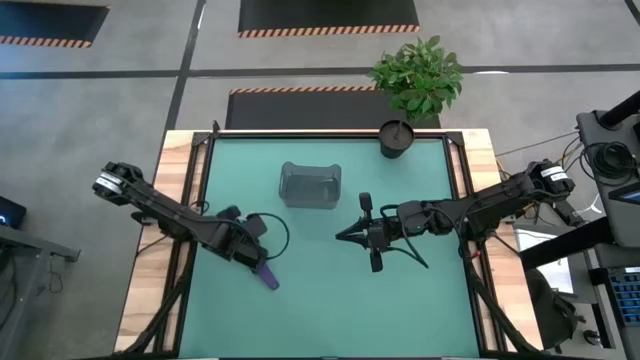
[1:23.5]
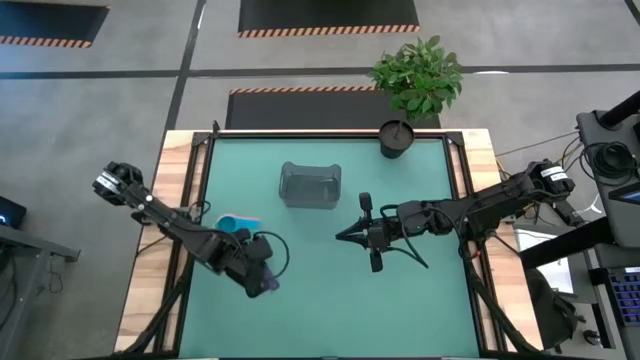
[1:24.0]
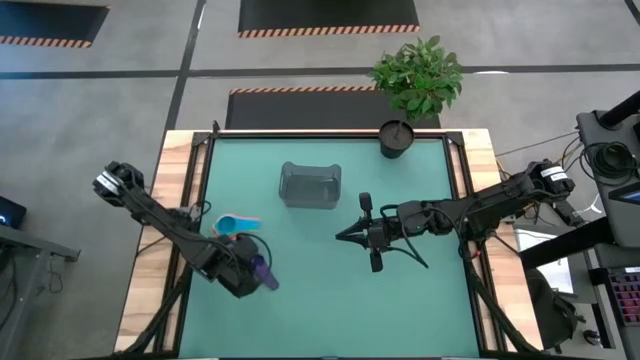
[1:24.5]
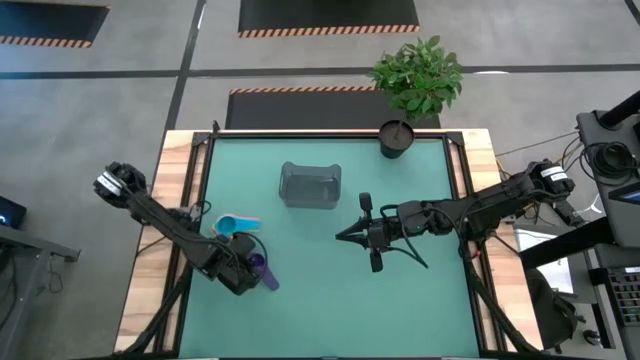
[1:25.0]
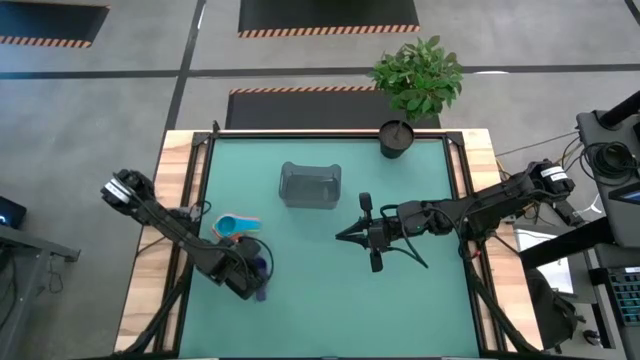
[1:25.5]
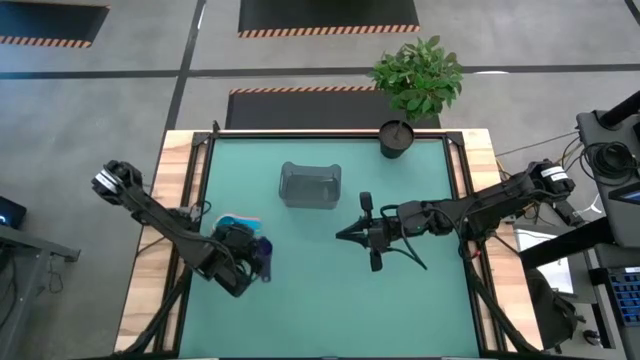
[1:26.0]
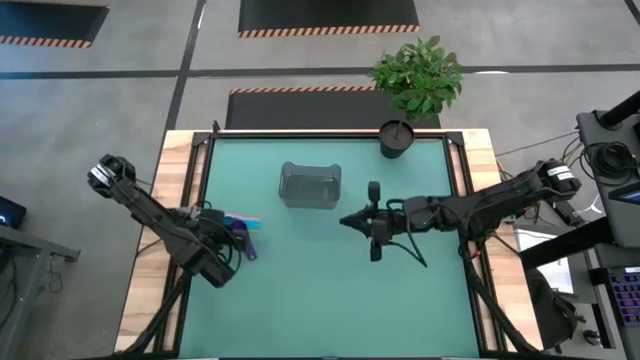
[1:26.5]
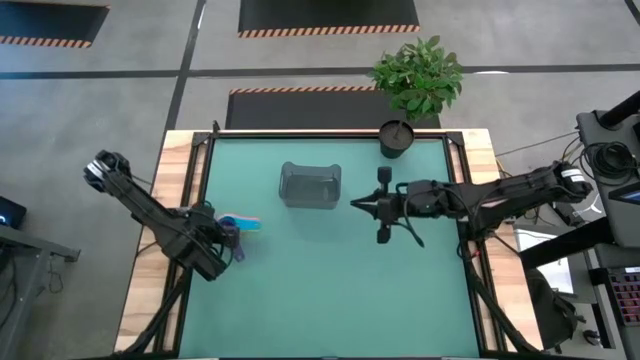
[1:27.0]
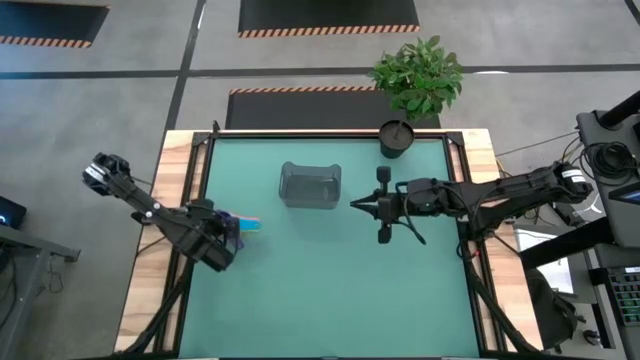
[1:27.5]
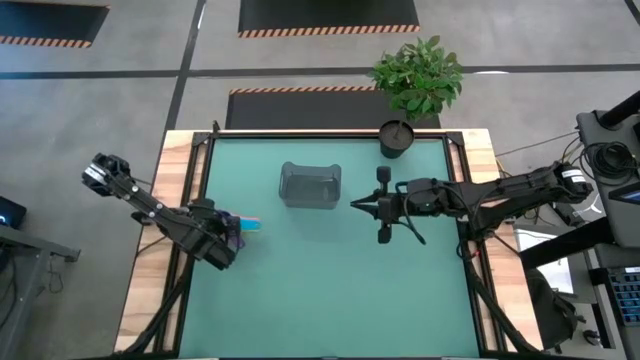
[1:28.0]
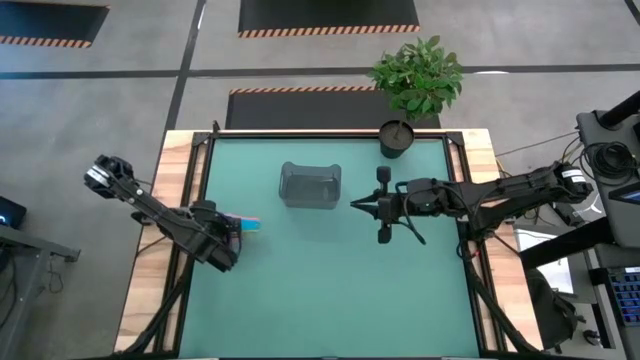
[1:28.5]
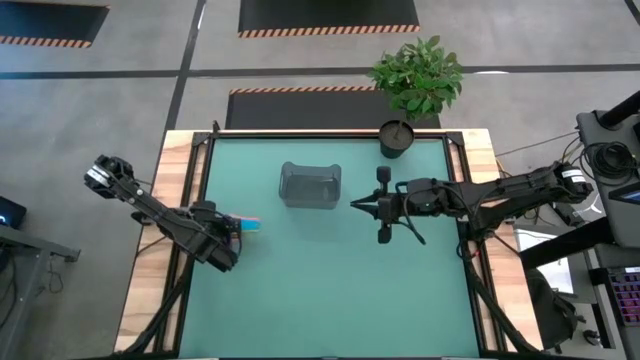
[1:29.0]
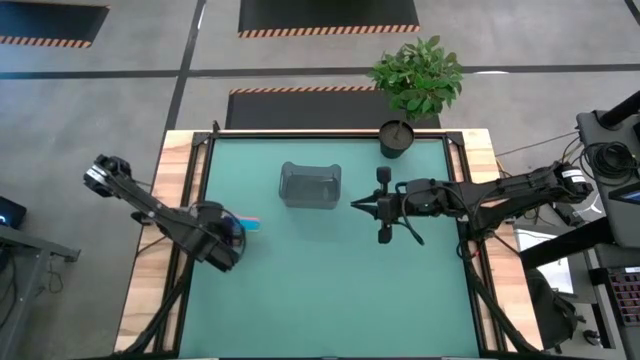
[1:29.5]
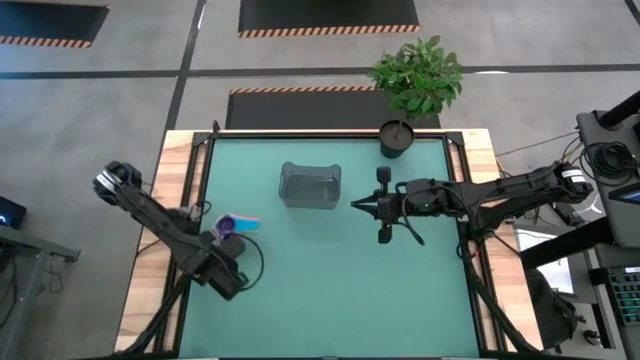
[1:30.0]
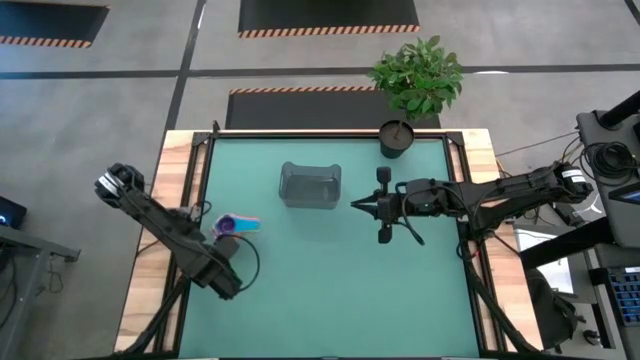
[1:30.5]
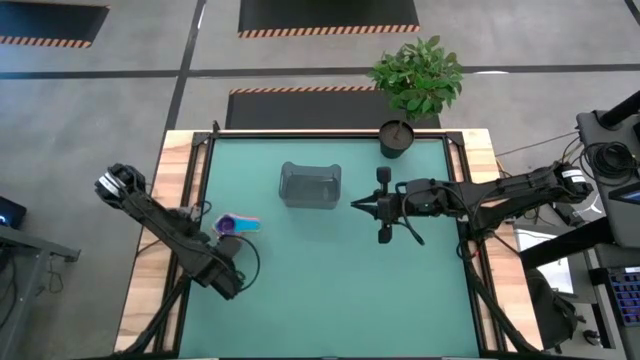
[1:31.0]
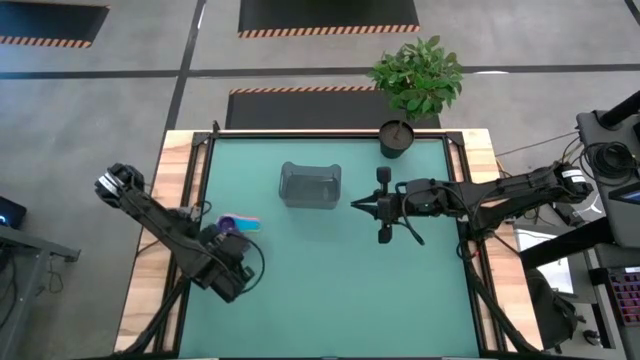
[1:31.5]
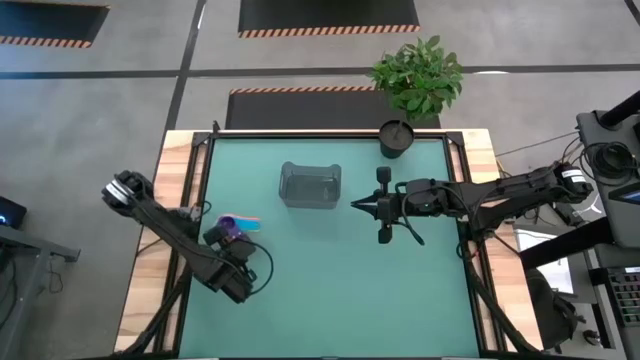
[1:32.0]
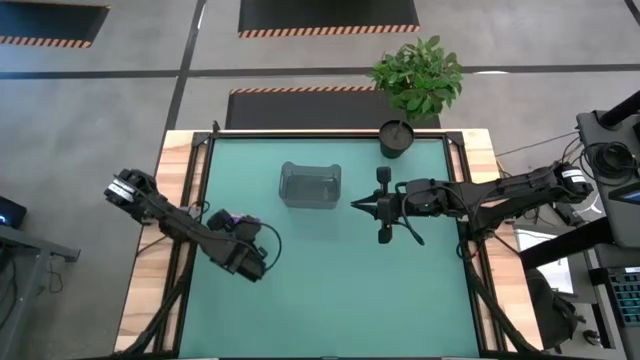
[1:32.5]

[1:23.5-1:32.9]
Task: Nest measuring cups in basket
Stack the purple measuring cup into the blue measuring cup

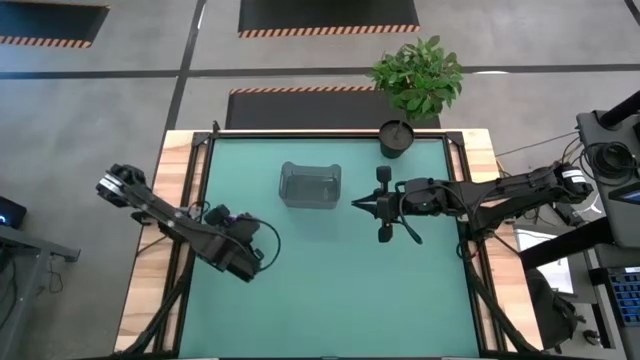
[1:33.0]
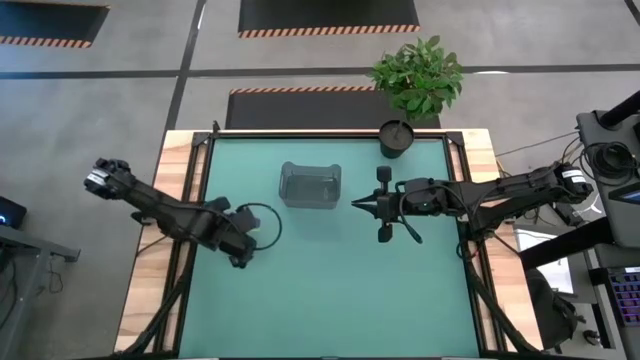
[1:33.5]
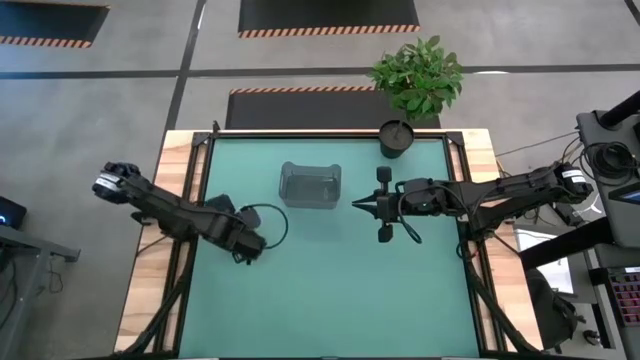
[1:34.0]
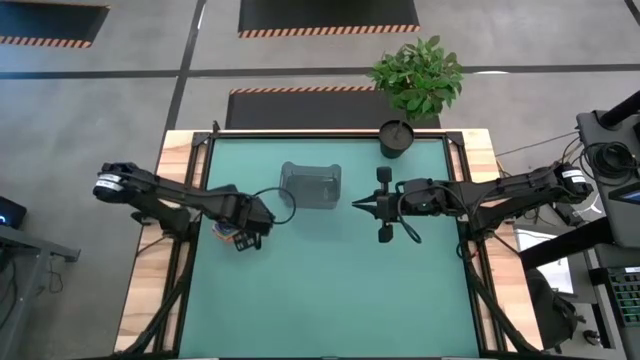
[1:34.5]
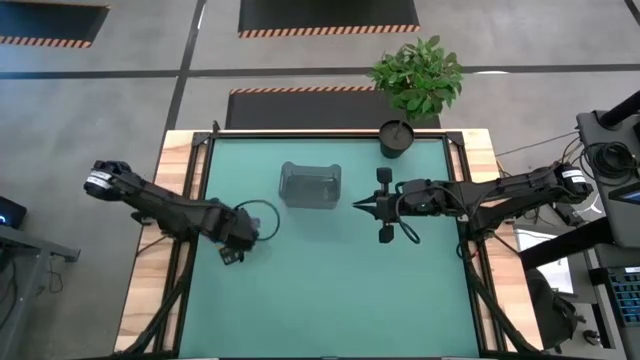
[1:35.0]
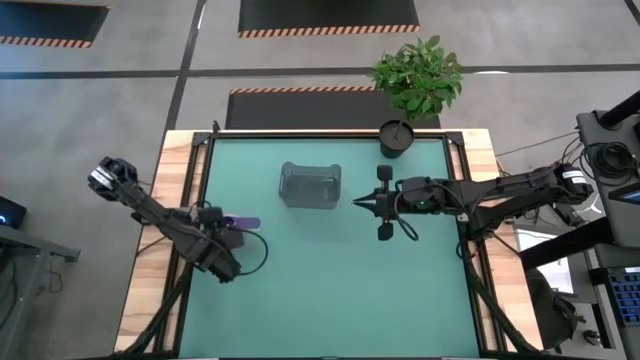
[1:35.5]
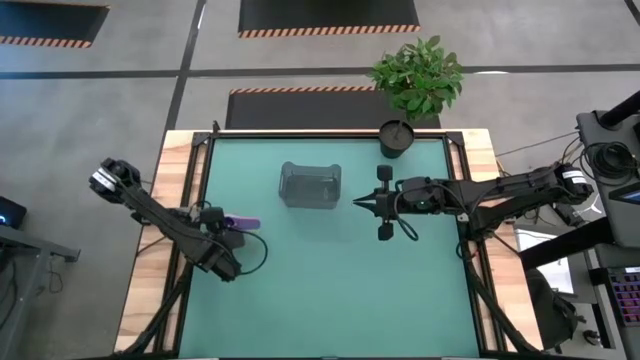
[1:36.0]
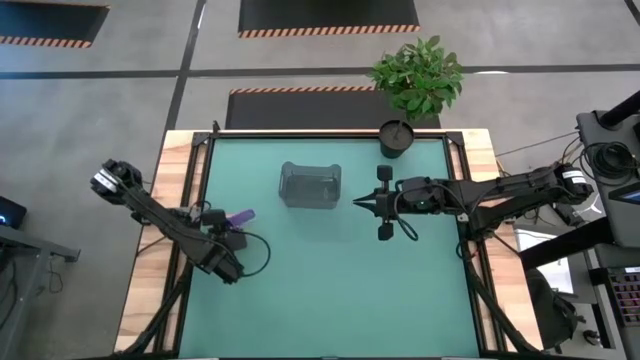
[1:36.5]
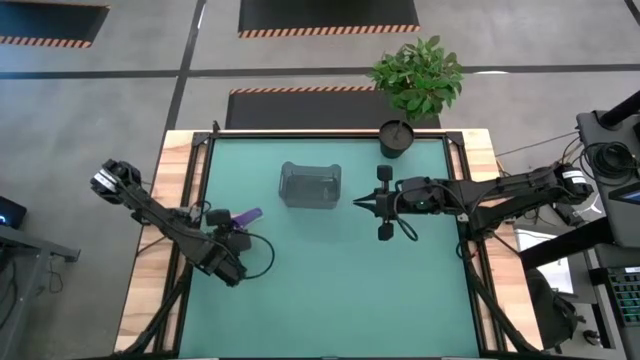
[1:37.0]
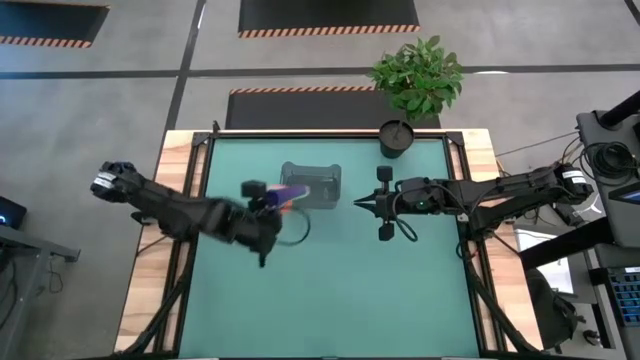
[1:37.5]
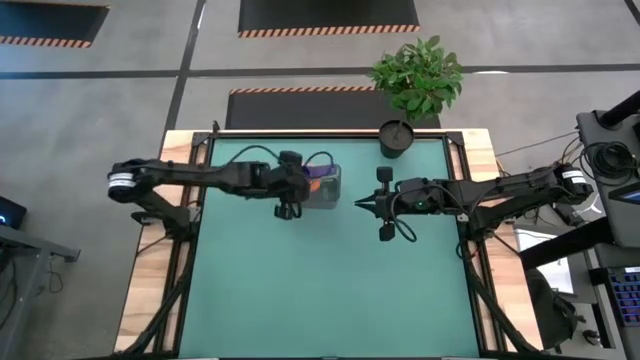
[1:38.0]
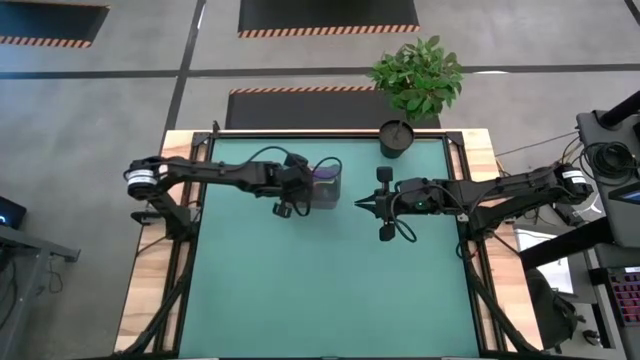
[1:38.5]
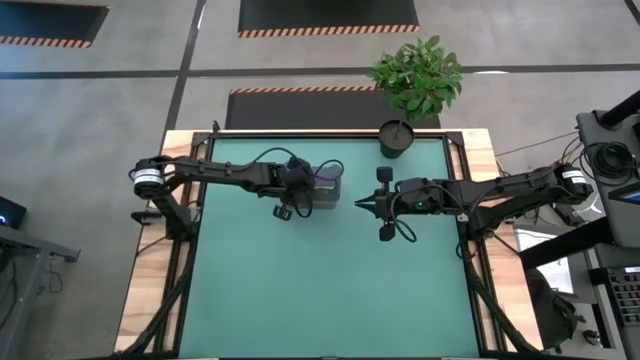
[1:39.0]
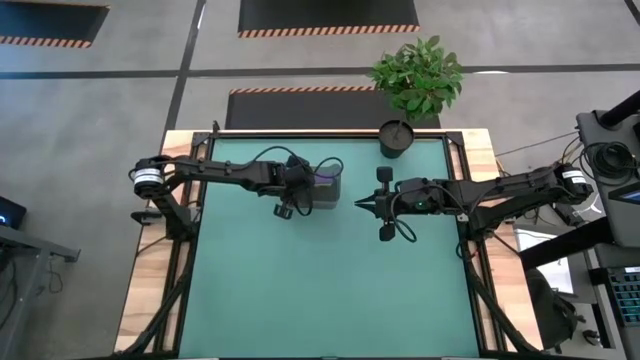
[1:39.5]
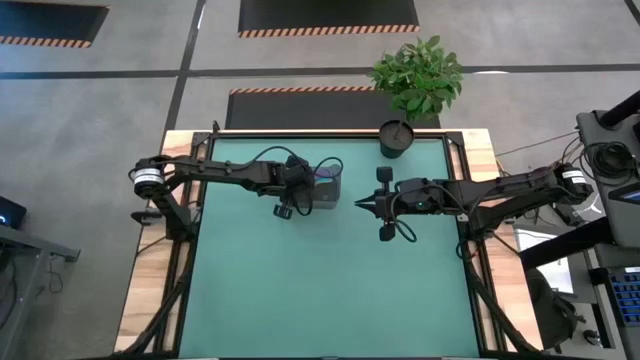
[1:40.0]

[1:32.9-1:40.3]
Put all the measuring cups into the black bin

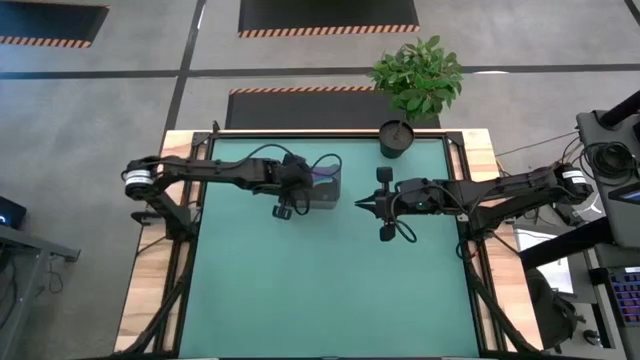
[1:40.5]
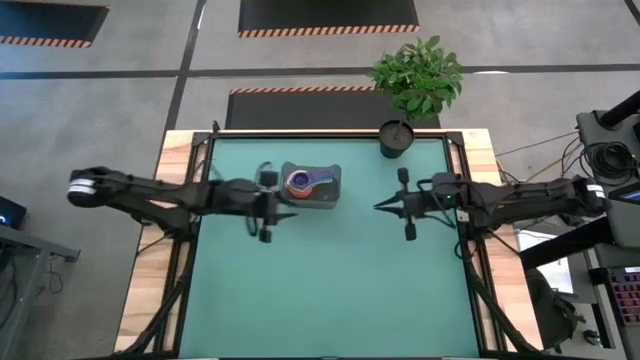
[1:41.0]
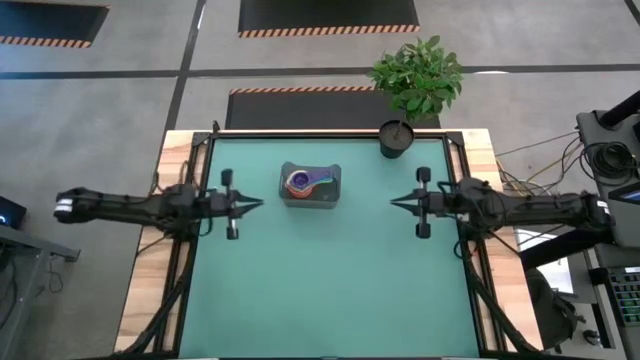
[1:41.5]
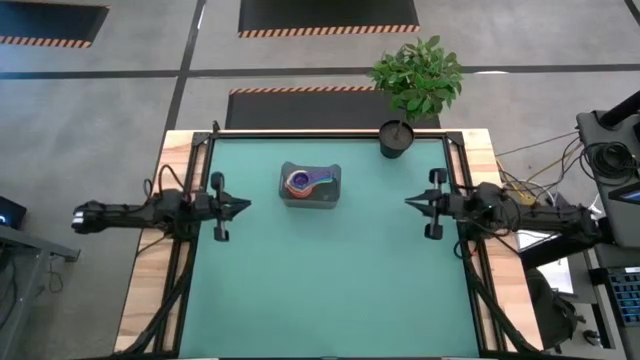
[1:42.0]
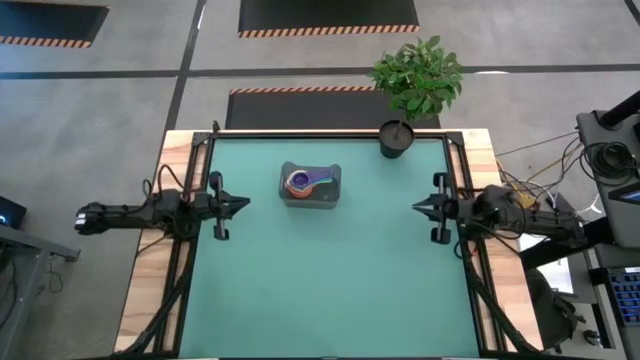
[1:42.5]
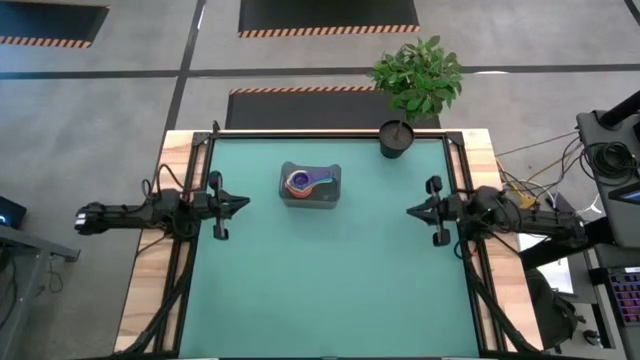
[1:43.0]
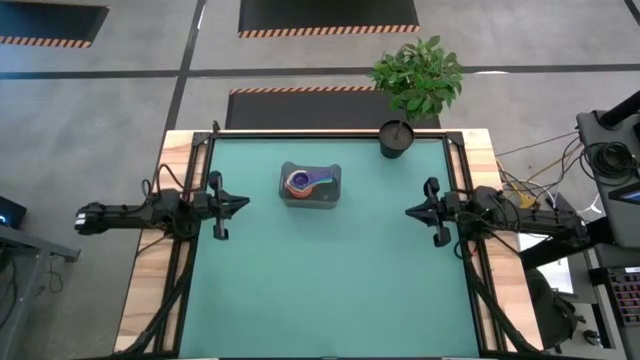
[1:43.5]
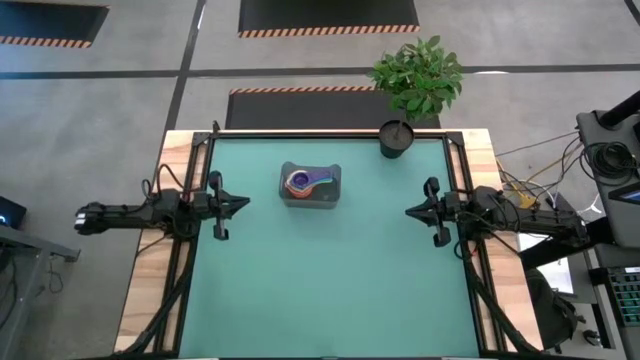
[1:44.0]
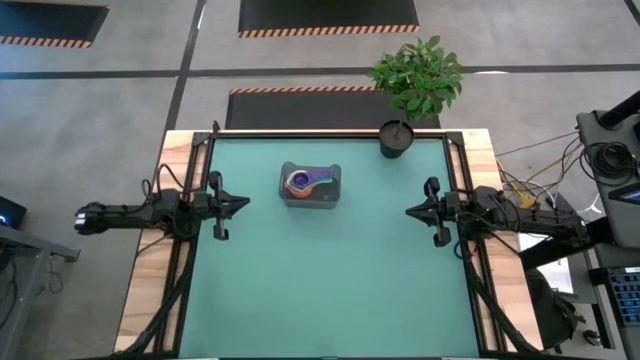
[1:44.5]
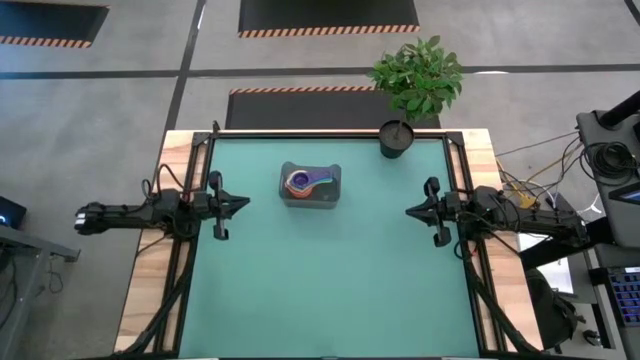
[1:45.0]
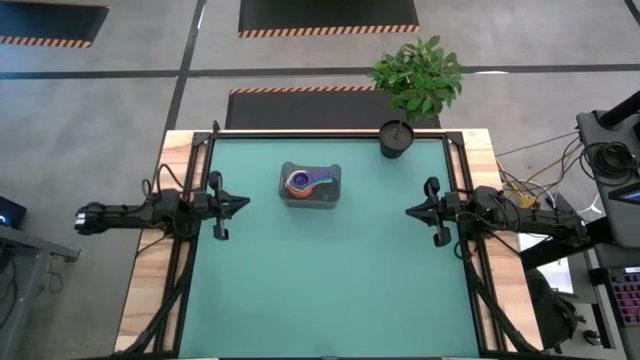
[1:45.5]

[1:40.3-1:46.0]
Return to Home Position
